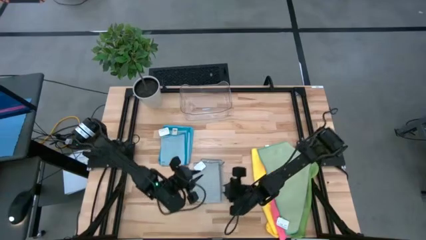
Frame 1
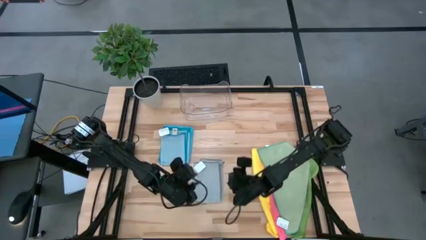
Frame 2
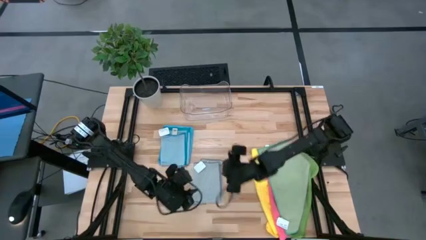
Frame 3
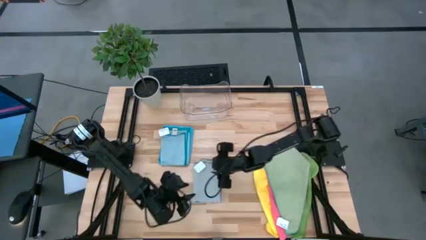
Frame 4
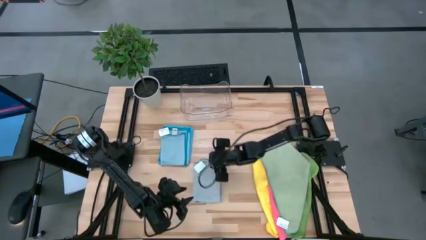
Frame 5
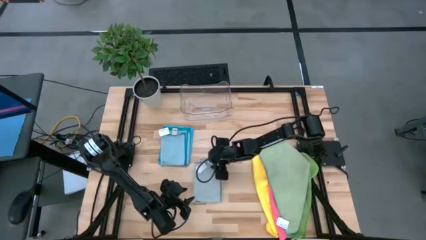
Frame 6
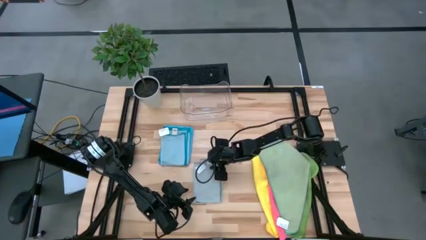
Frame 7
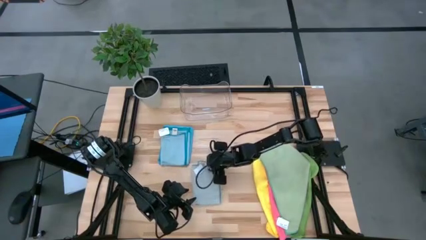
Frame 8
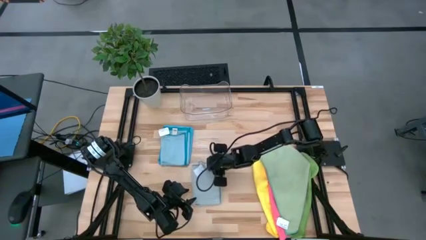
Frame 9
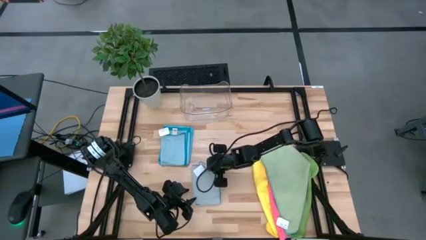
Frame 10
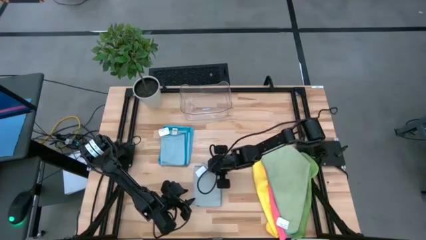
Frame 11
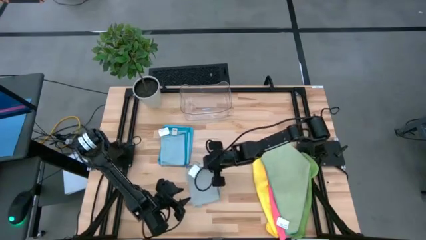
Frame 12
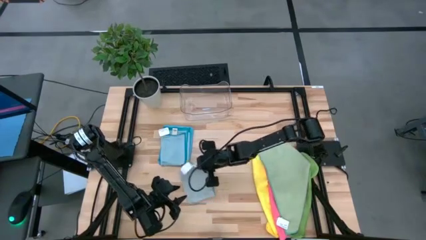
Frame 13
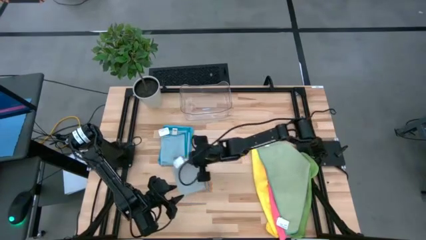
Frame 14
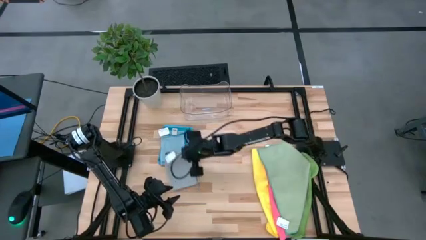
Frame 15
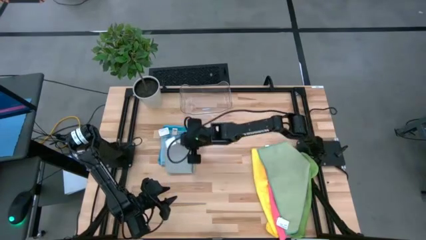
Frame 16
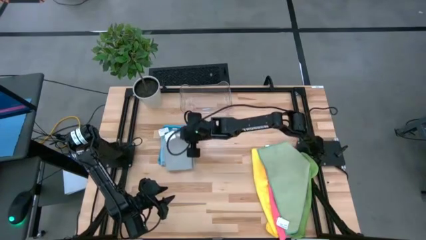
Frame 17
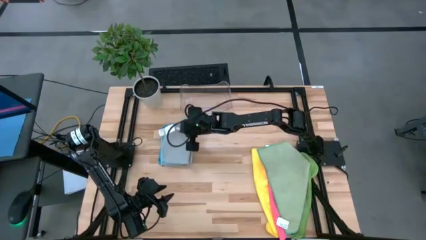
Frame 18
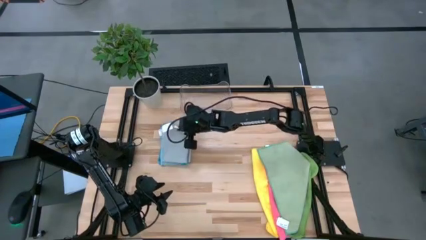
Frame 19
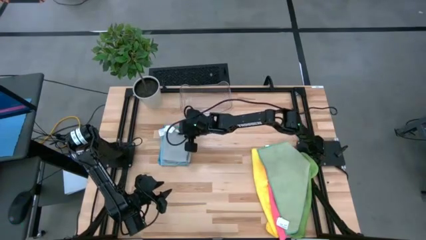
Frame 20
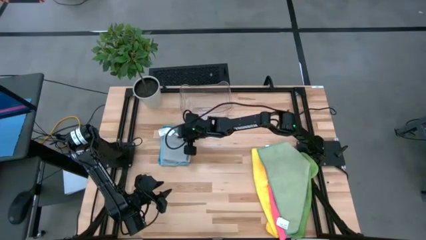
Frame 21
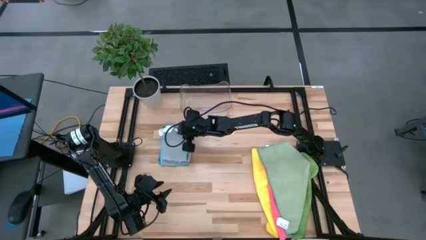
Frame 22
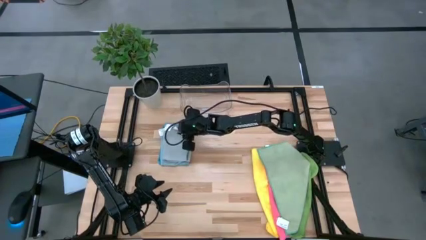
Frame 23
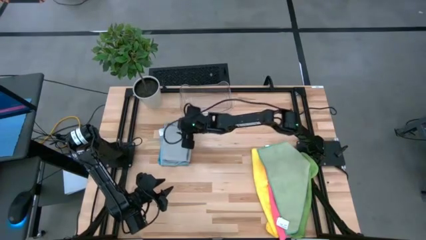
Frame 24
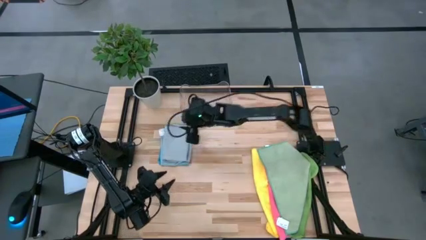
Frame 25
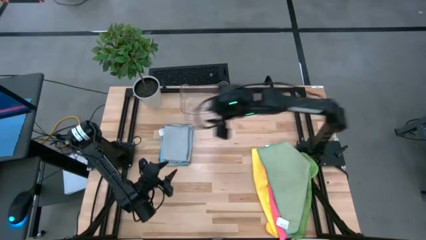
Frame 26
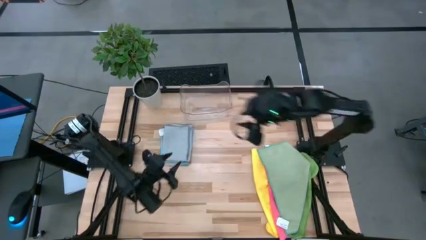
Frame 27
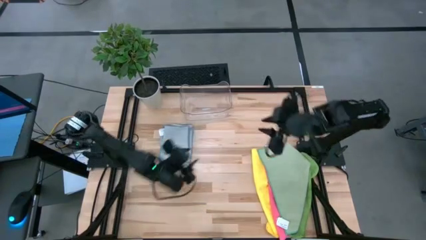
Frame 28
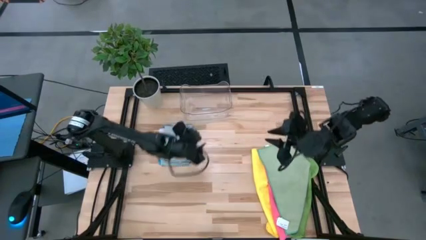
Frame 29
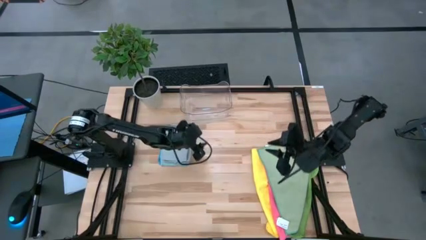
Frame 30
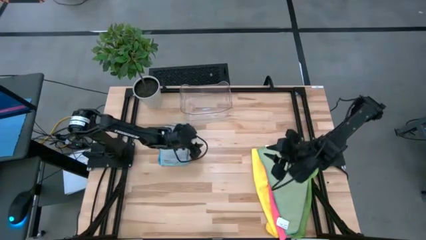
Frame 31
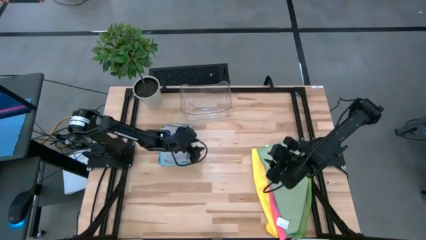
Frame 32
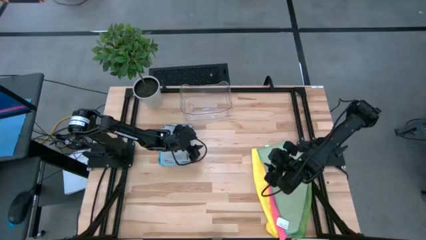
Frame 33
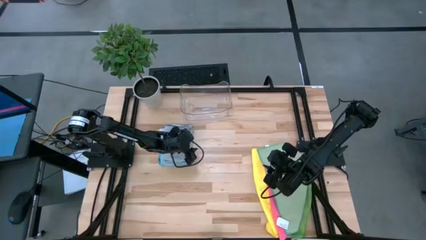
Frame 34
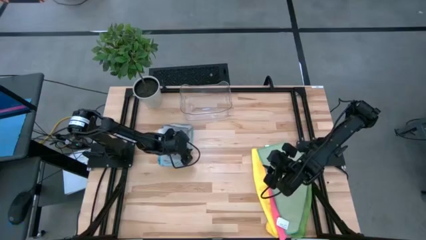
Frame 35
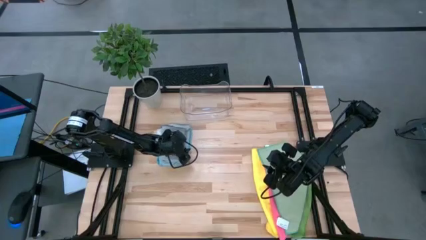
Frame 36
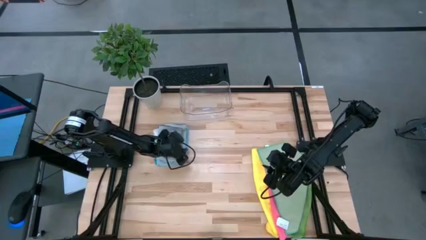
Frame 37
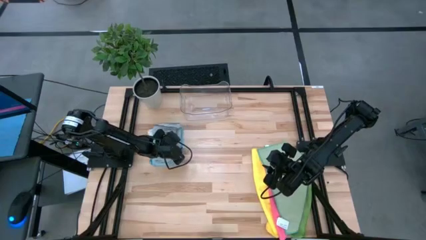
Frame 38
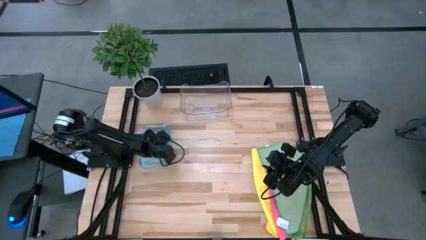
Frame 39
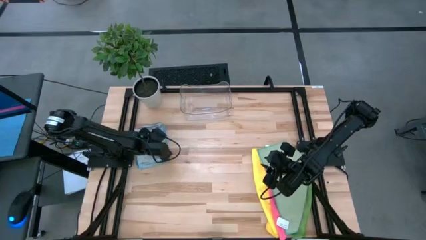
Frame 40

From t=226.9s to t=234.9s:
Task: Fold microfiber towels
Stack the folded gray microfiber cloth on top of the folded light blue microfiber cloth

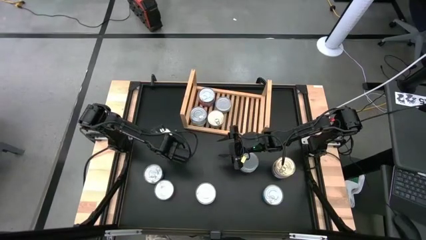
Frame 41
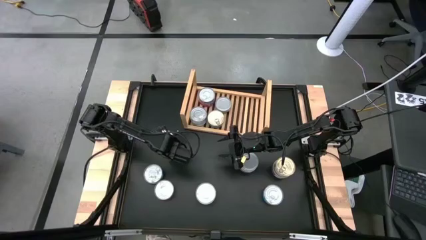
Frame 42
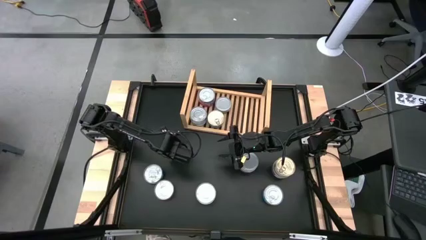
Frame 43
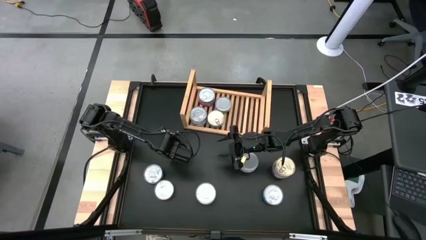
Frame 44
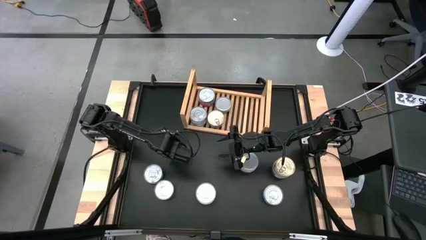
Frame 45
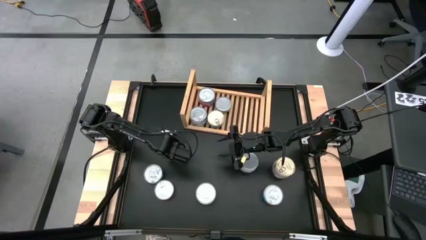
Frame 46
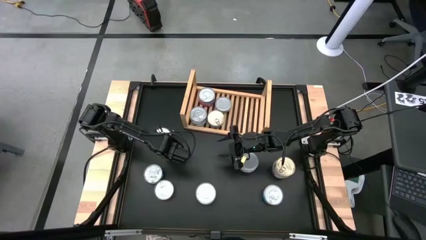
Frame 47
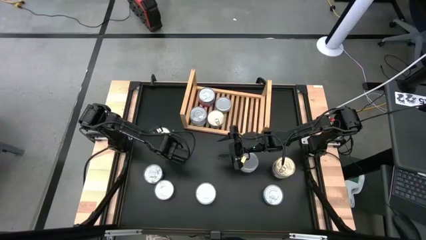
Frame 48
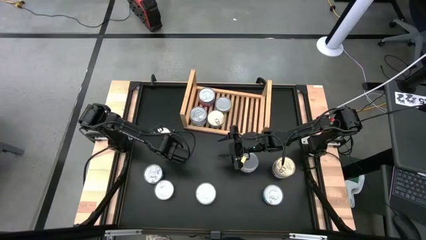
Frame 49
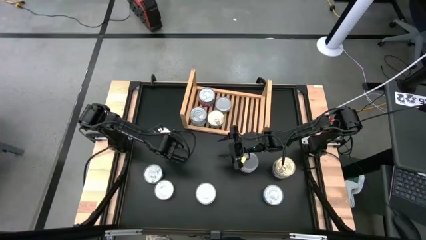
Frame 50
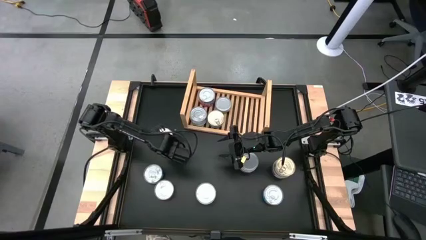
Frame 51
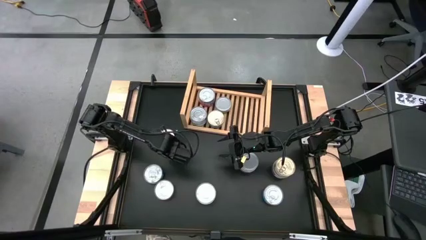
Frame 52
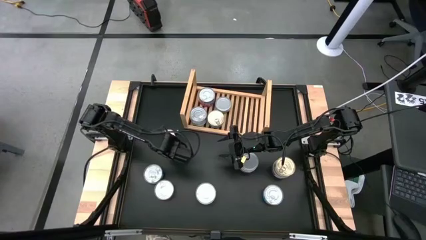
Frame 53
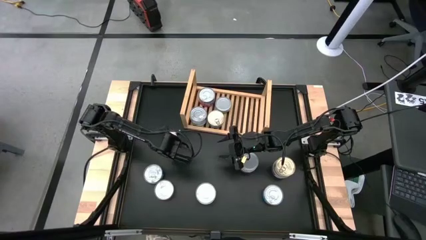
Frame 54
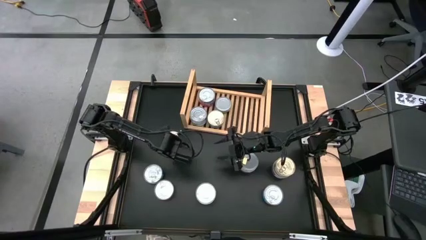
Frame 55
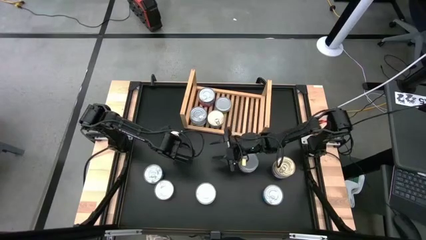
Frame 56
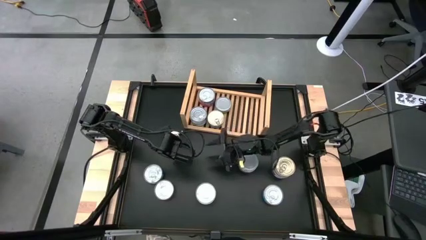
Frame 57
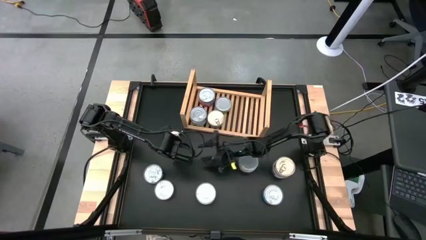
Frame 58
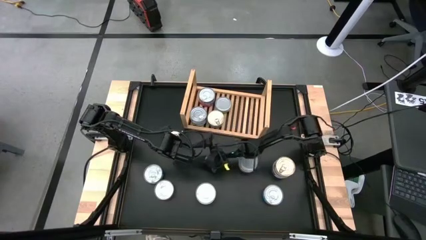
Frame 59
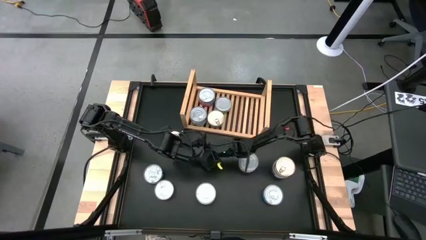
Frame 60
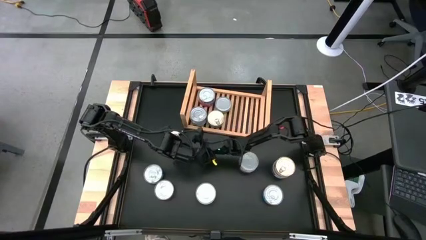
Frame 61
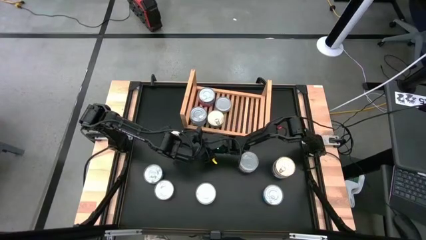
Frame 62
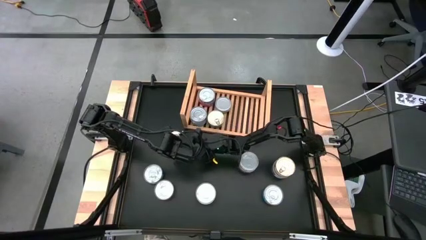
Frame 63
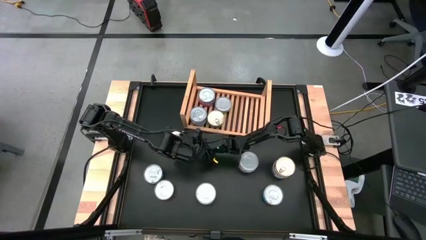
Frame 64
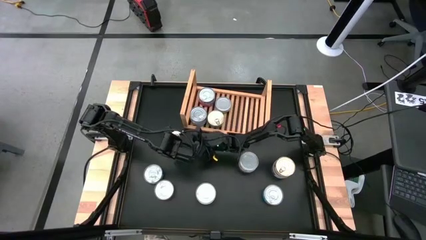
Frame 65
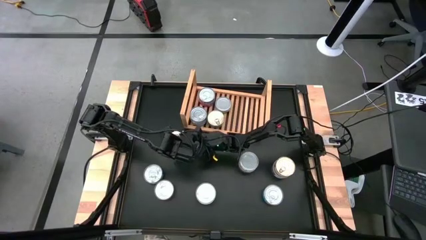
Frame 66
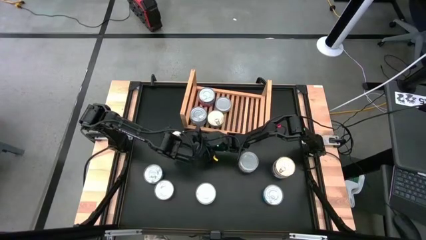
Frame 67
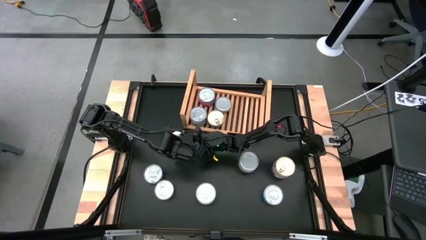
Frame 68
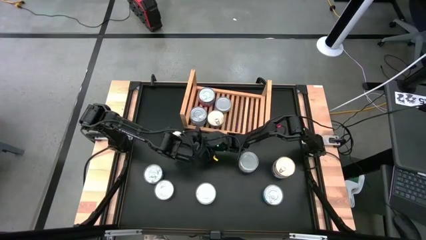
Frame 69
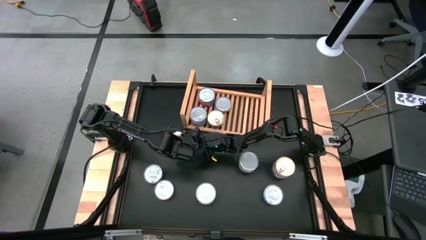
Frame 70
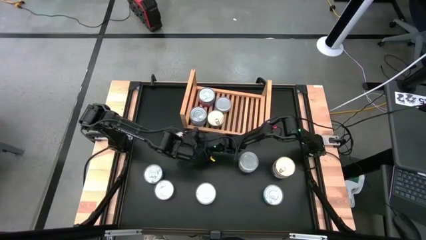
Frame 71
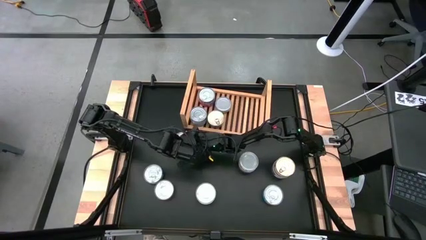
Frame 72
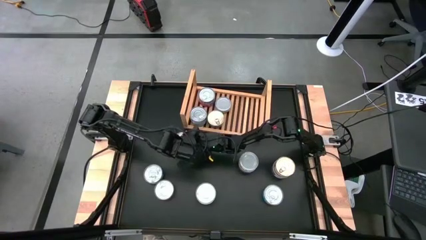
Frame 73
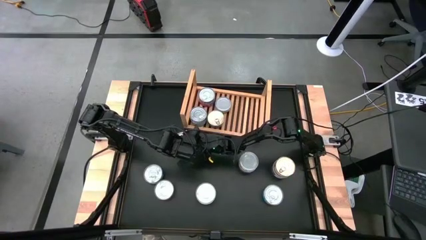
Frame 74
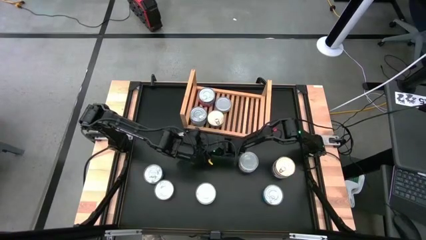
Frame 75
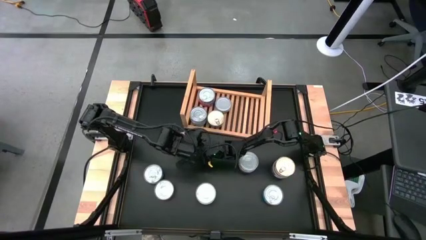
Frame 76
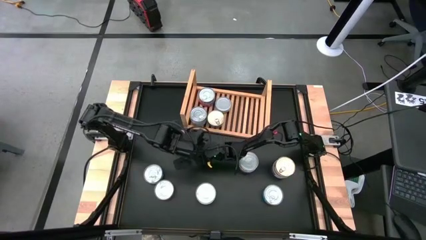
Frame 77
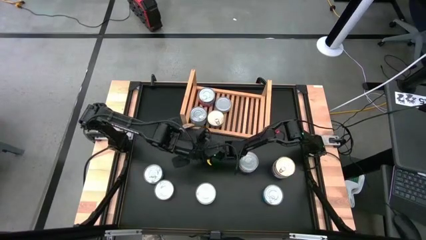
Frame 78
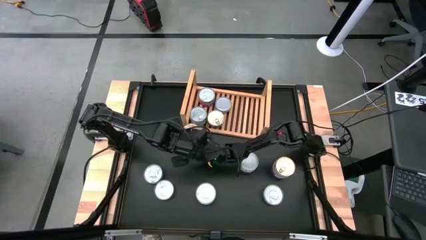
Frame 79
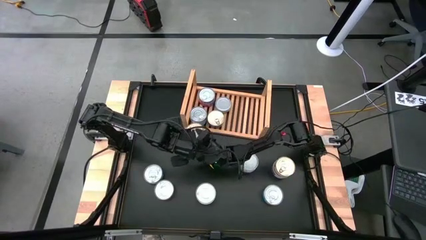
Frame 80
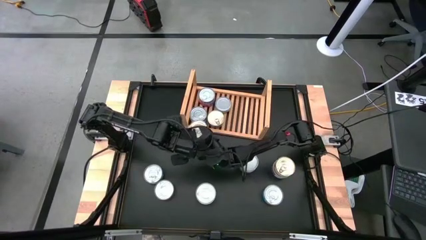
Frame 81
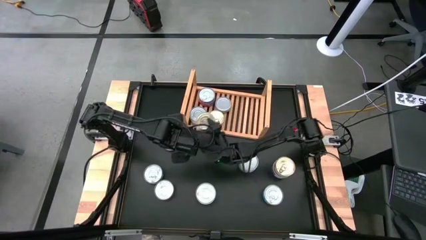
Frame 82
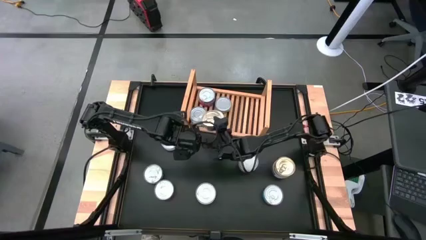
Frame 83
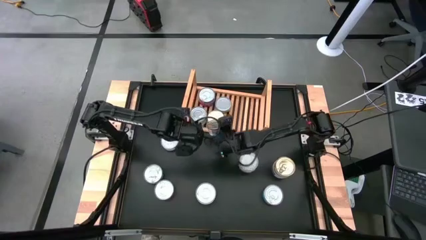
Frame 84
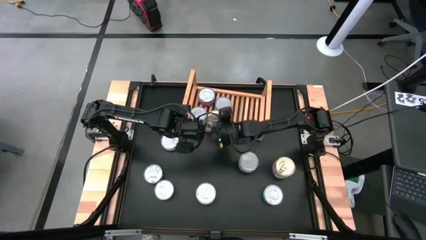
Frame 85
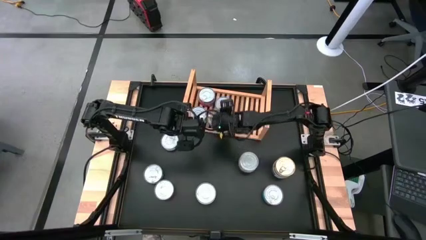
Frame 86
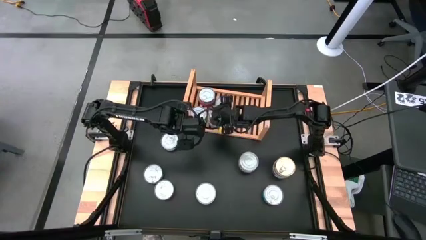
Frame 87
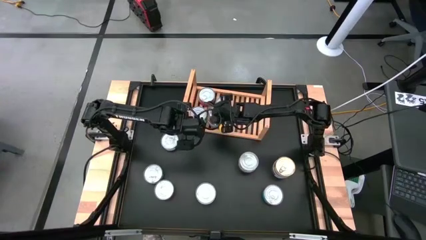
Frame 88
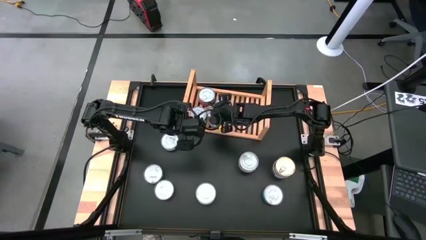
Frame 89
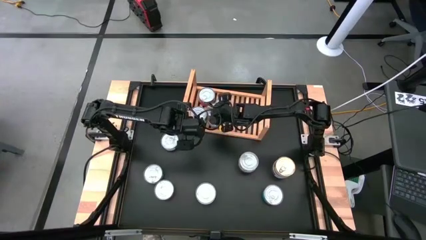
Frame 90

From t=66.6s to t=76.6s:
Task: Stack canned seafood by type on shelf
Stack the blue tuna can on top of the other blue tuna can on the shelf
